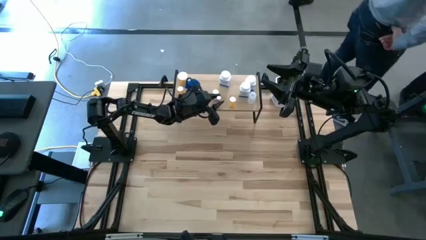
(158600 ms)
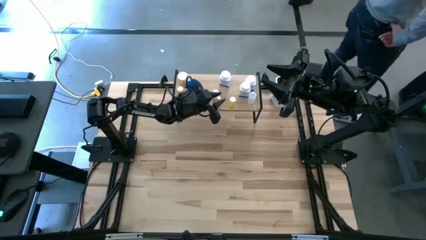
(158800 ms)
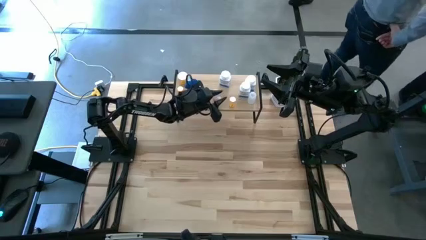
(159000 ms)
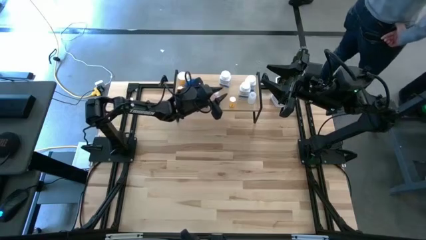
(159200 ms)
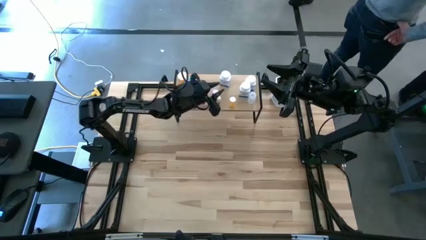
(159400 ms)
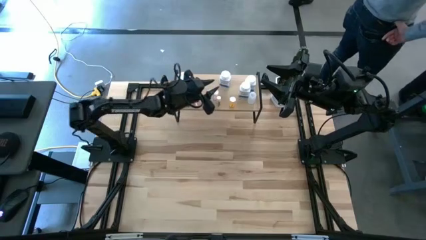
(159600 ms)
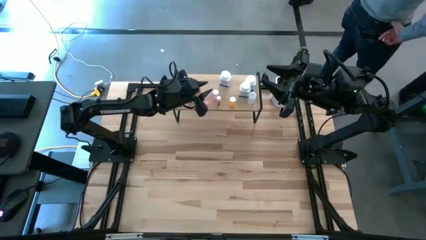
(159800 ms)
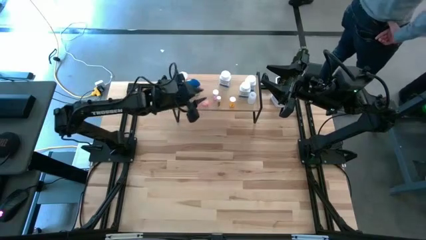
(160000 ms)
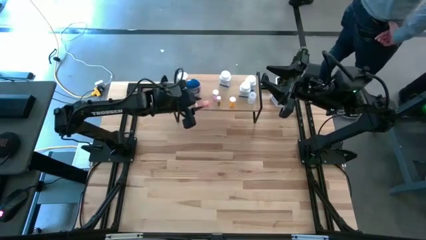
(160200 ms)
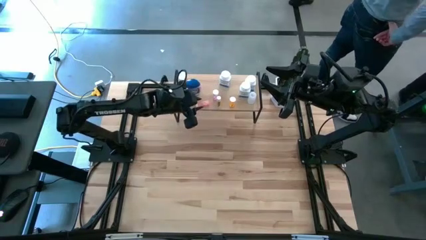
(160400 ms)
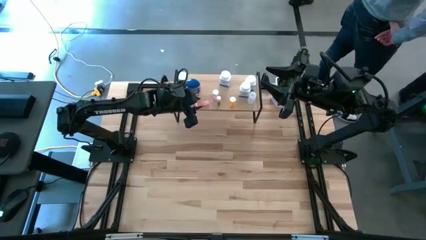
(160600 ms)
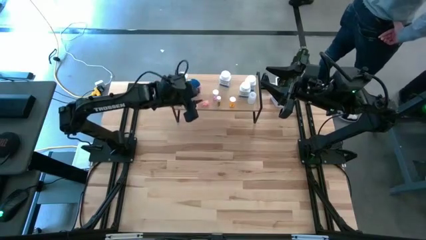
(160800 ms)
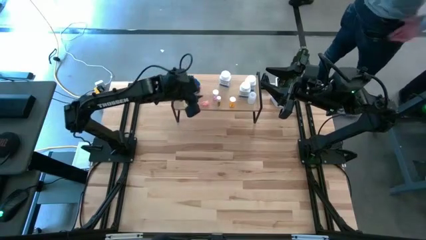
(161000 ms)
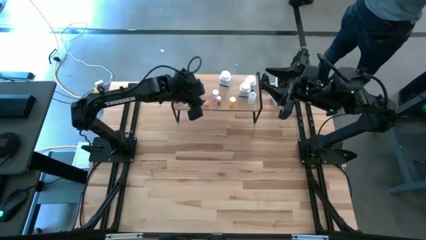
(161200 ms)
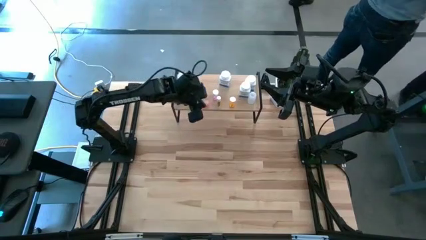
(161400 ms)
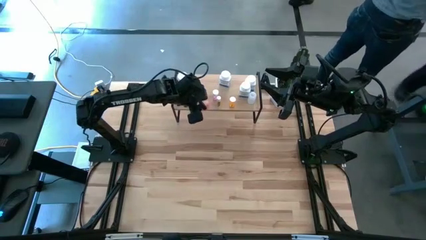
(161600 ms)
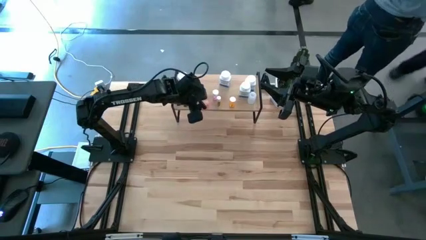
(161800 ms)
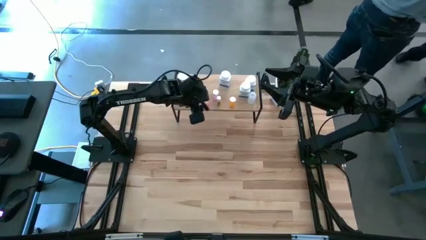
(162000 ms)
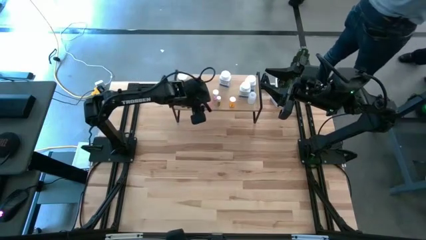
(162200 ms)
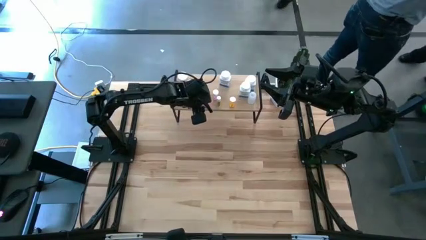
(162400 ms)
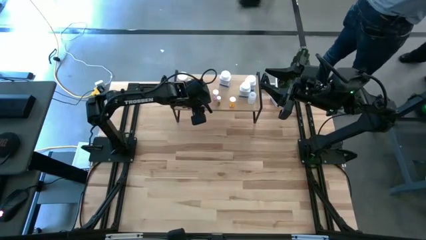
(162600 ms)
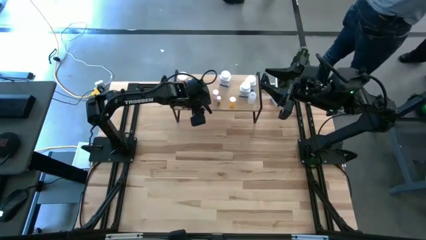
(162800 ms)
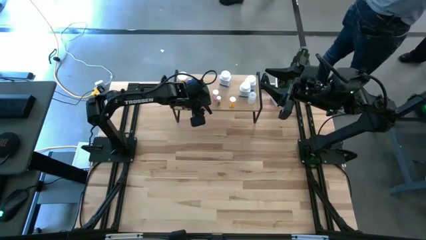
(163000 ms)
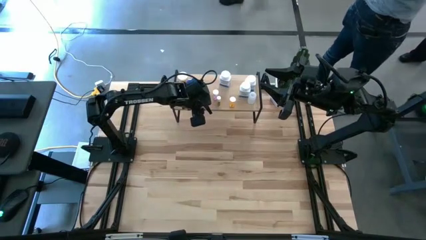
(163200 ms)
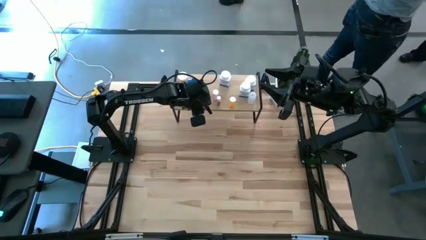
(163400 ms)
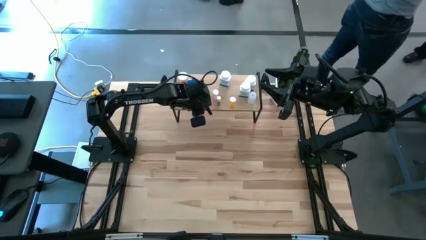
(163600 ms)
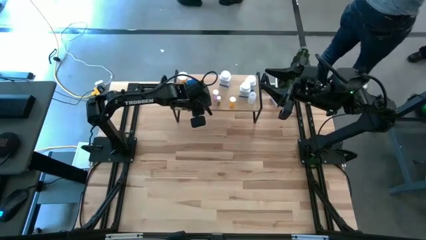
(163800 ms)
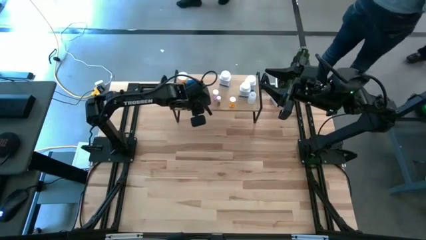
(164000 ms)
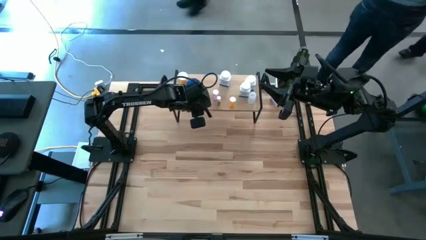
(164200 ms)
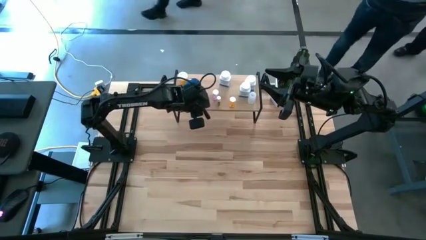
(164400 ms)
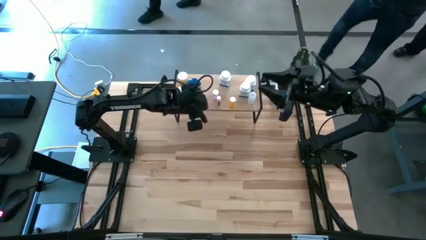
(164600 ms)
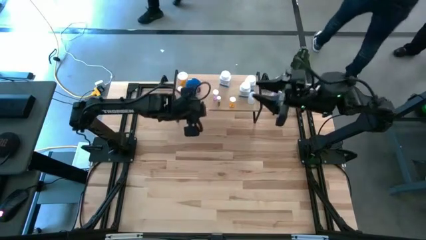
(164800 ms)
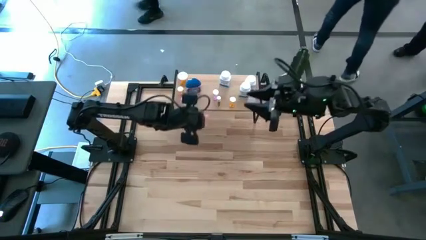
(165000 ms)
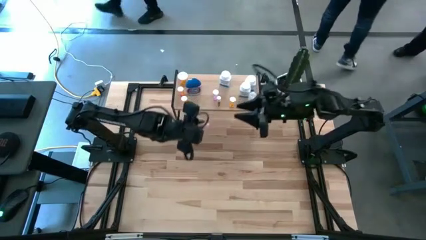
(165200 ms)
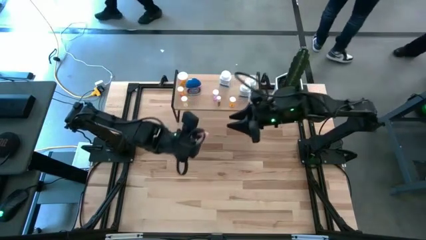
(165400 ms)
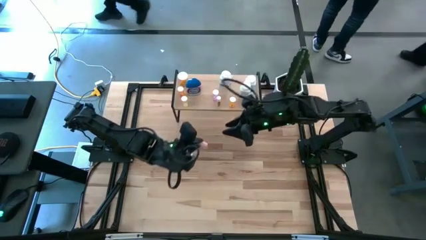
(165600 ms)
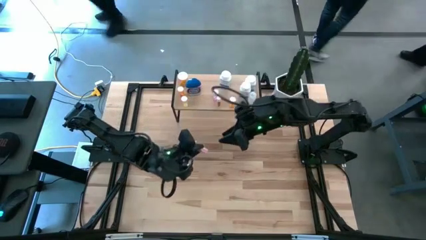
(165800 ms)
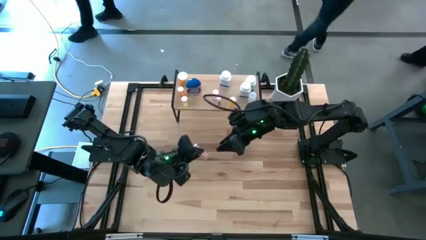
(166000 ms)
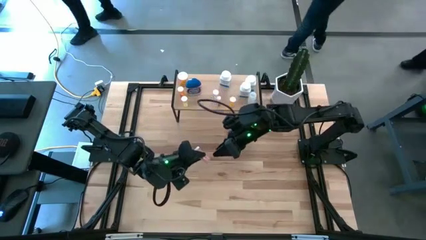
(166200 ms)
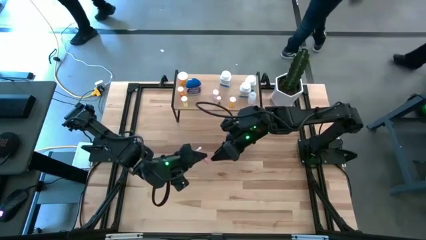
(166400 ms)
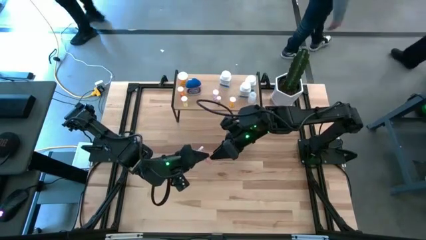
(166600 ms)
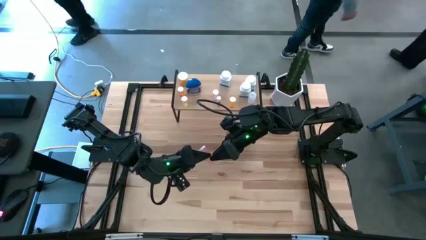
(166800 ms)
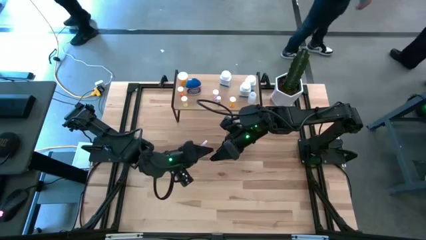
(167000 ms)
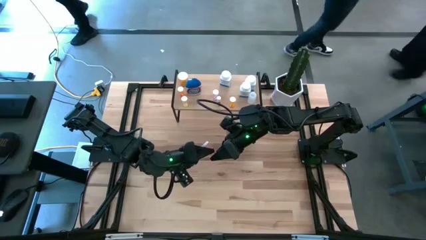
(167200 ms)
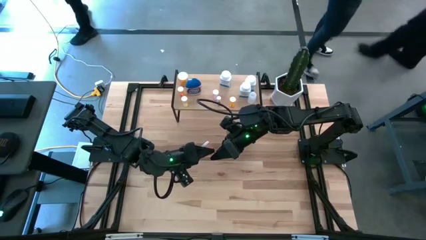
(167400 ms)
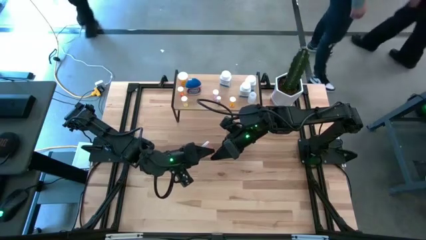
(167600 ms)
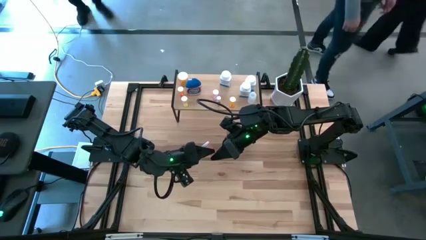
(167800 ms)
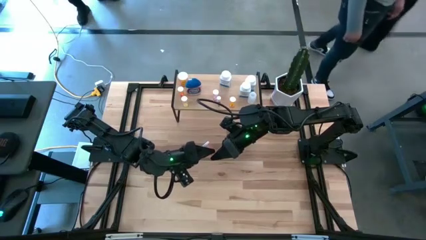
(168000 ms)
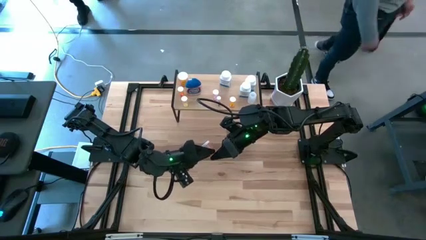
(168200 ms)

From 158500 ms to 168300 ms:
Task: Pick and place medicine bottles onto shelf by color
Adjust the red pill bottle on the shelf

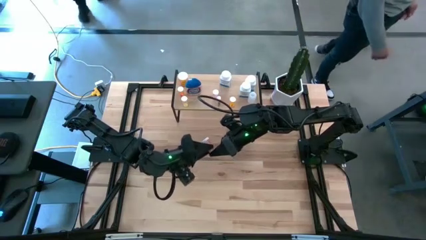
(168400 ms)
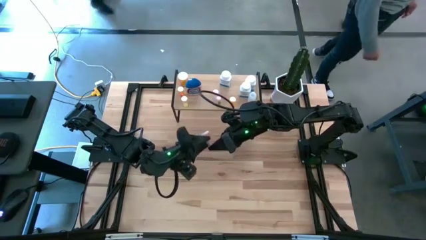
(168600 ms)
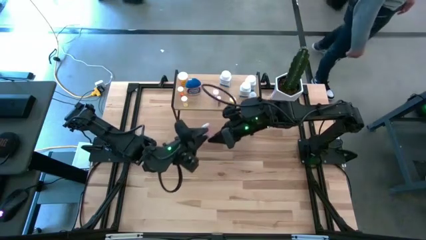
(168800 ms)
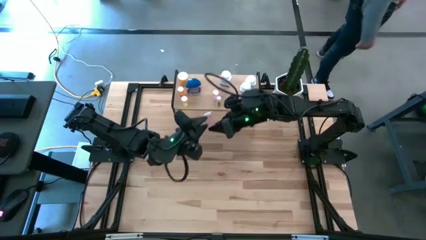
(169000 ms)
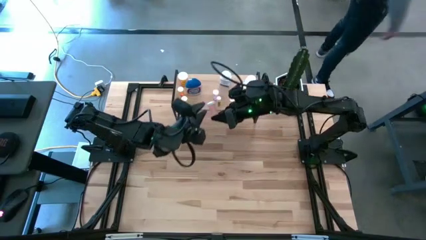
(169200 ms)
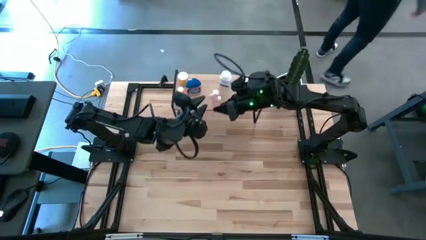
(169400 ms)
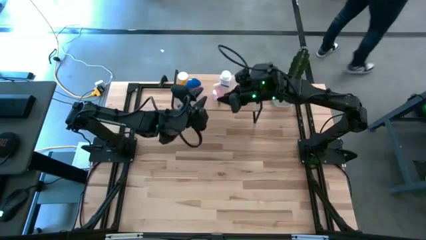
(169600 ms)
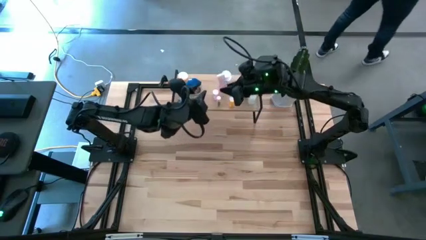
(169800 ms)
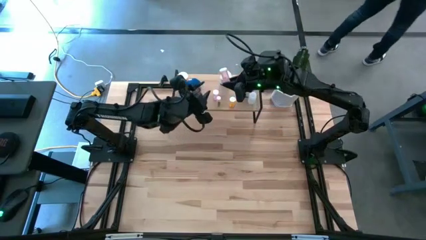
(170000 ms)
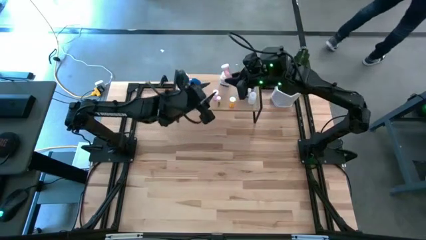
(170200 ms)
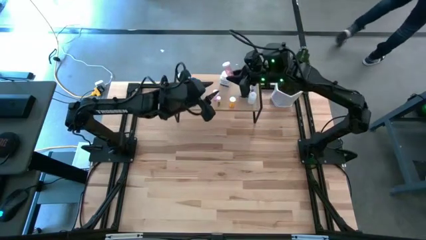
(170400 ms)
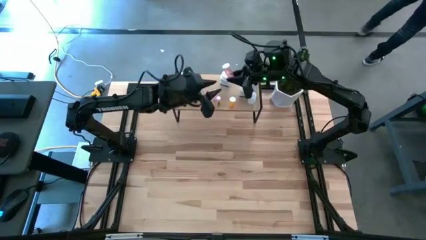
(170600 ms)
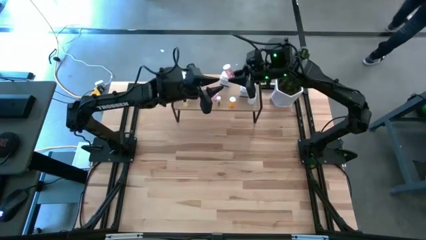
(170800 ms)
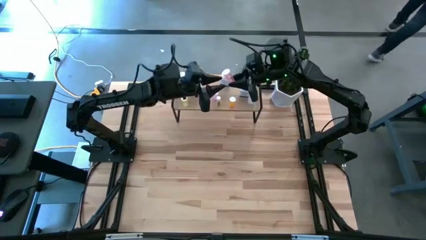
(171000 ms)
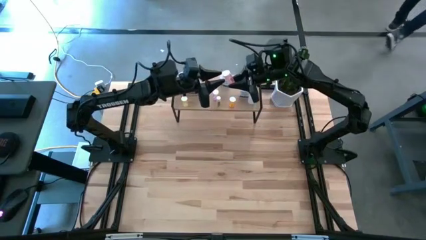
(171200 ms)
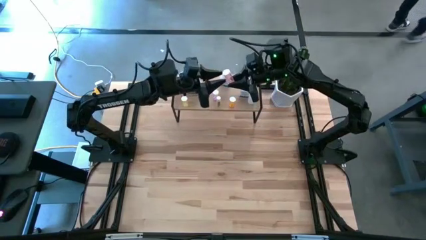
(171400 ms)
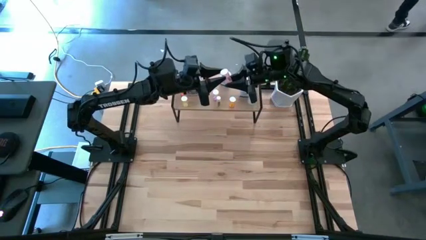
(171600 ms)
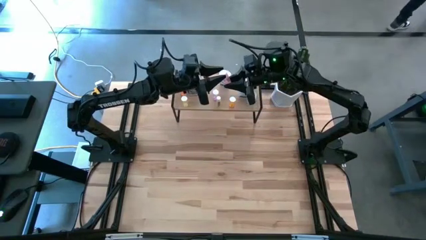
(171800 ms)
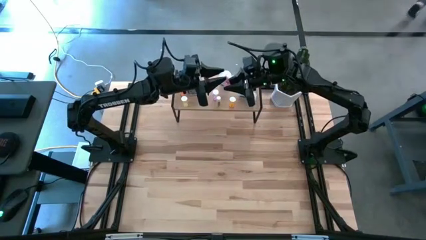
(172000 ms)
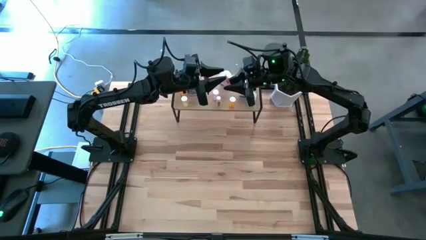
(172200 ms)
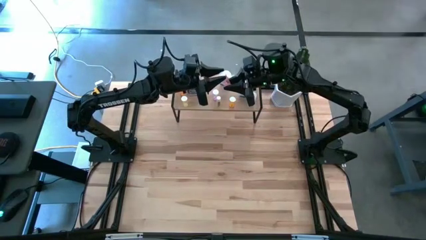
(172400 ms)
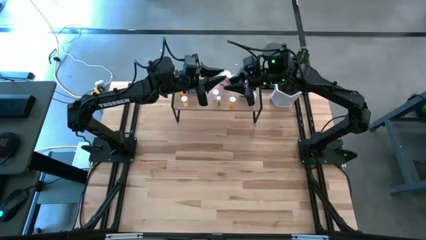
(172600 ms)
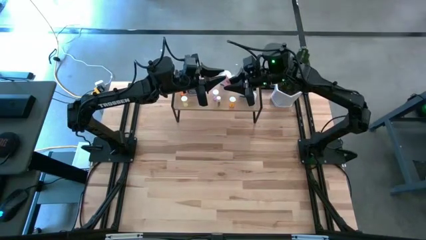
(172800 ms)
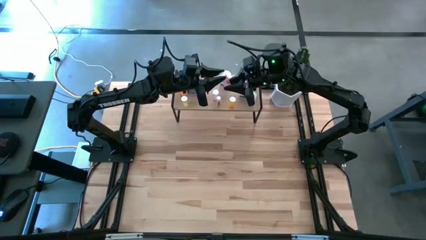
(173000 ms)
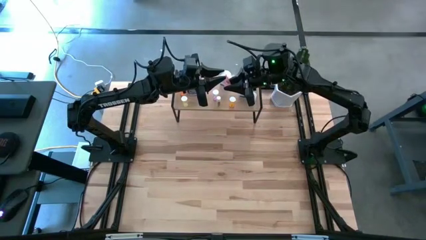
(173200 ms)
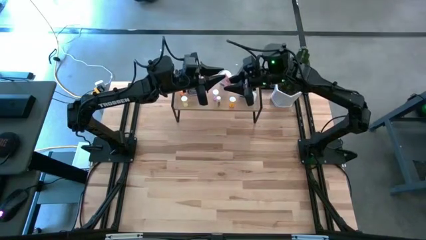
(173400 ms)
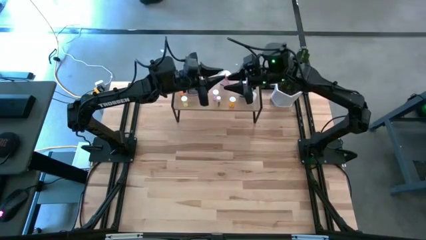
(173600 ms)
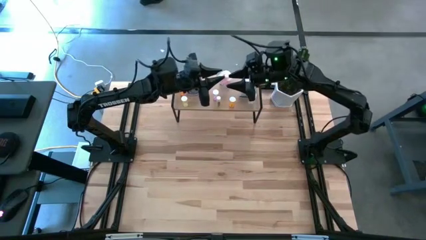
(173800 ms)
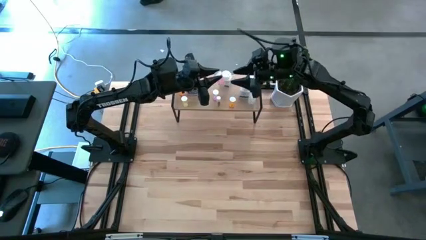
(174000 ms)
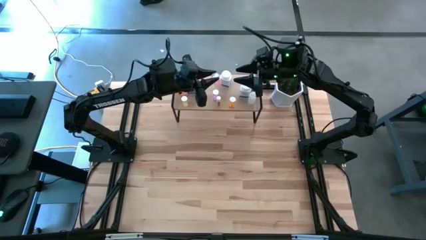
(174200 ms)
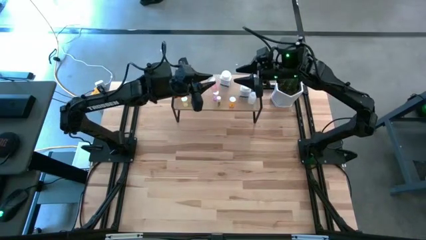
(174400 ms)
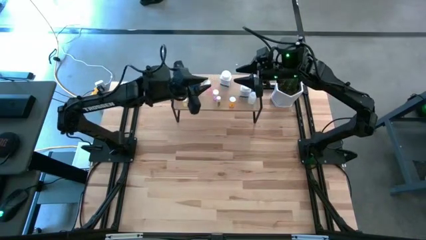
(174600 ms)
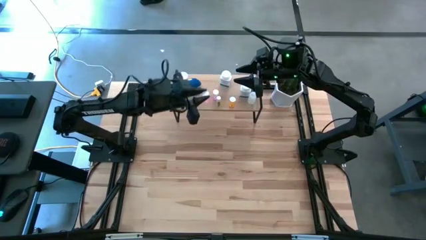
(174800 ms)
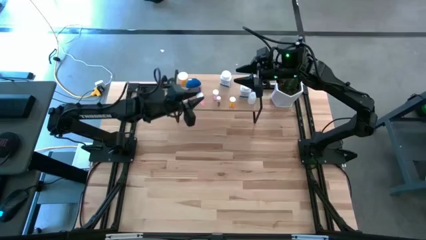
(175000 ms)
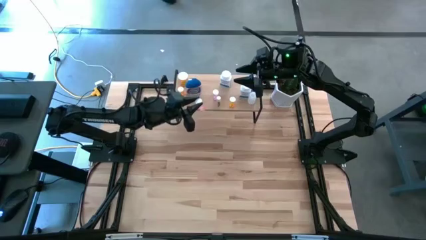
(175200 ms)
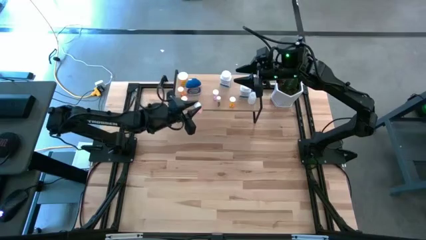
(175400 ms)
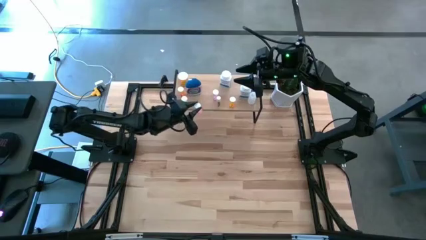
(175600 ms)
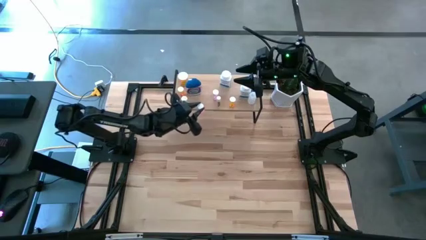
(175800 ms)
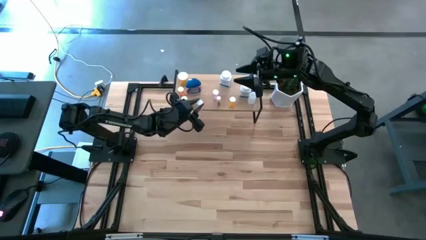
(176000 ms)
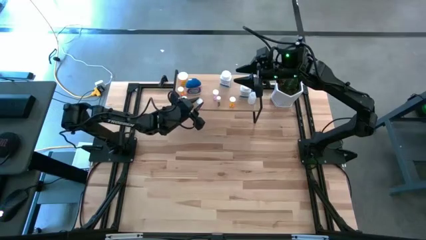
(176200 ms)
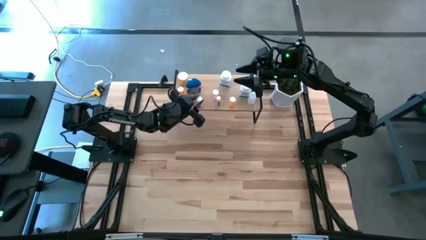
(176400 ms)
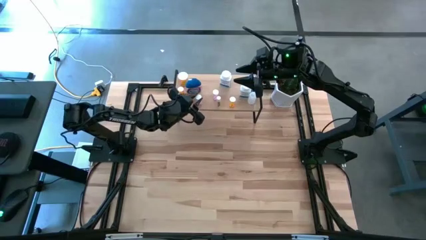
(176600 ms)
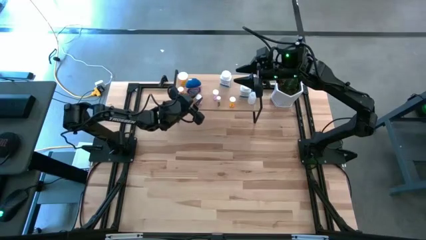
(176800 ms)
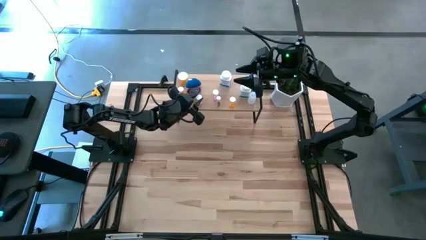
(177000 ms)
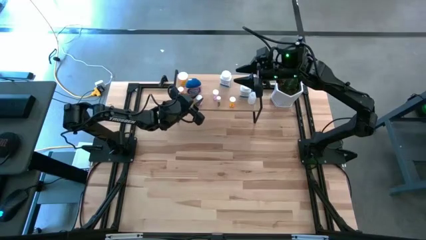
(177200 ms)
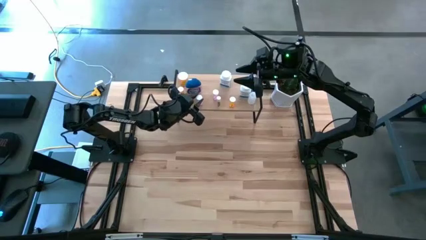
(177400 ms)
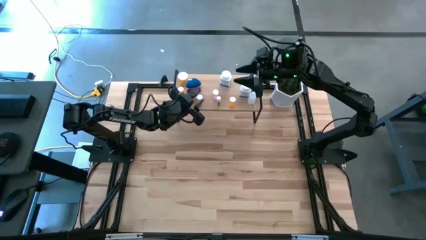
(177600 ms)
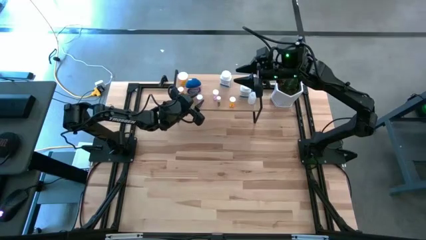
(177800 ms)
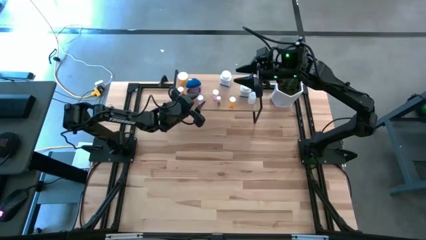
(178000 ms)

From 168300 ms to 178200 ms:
Adjust the red pill bottle on the shelf
